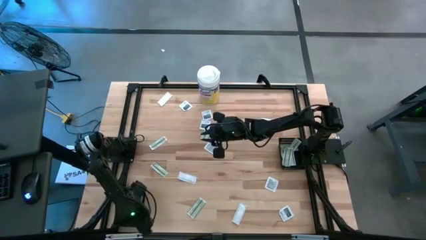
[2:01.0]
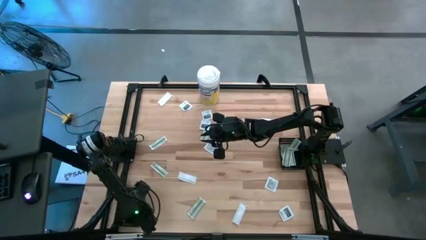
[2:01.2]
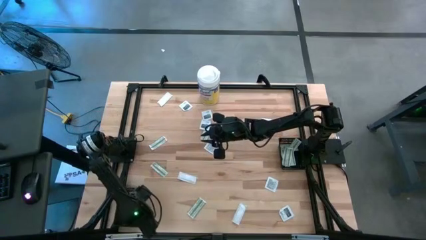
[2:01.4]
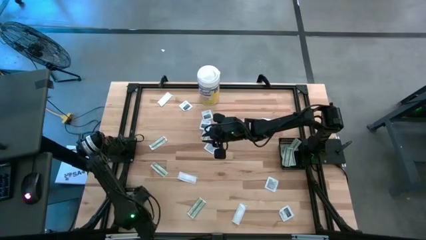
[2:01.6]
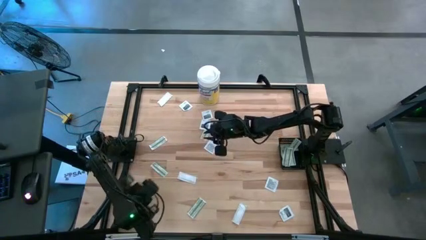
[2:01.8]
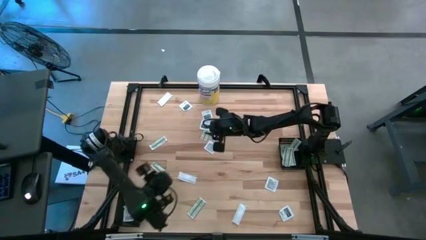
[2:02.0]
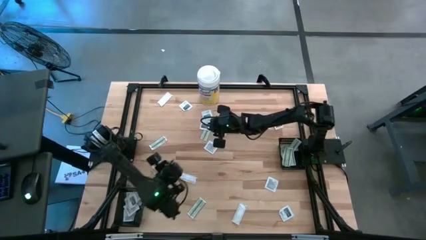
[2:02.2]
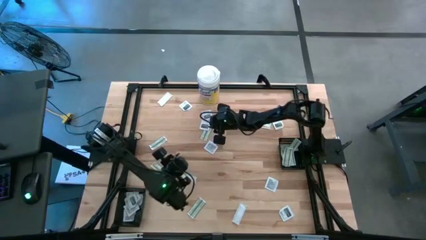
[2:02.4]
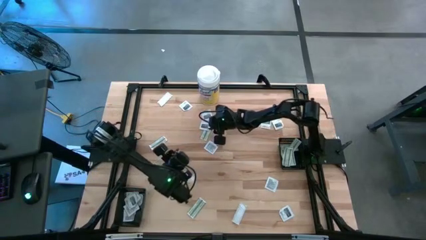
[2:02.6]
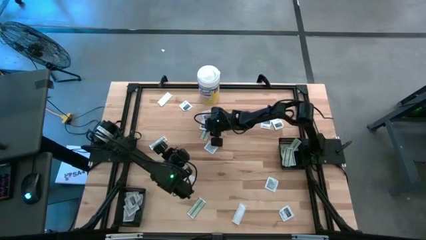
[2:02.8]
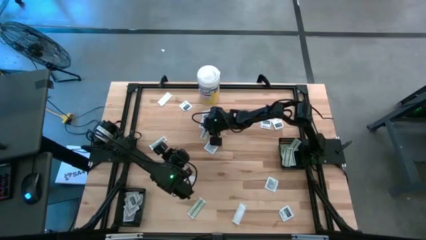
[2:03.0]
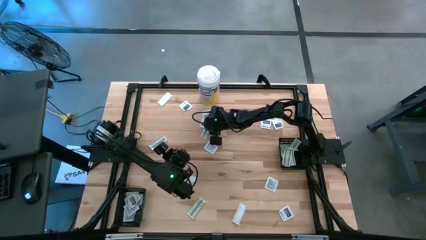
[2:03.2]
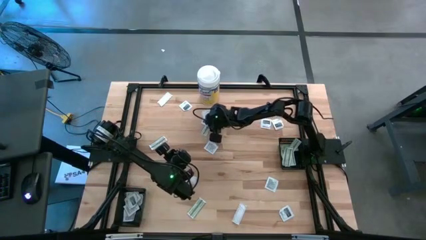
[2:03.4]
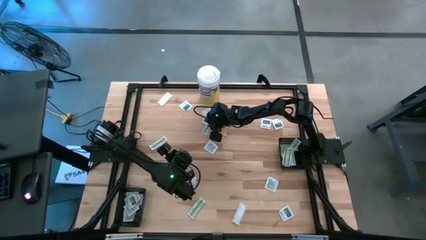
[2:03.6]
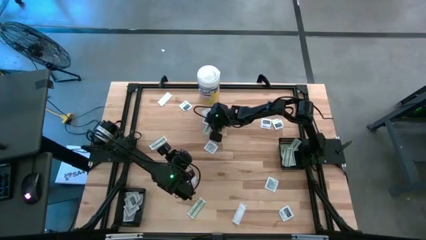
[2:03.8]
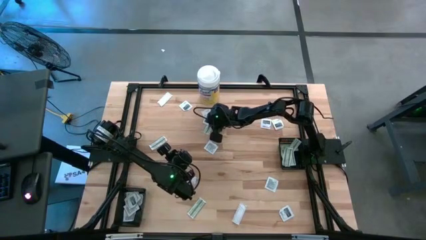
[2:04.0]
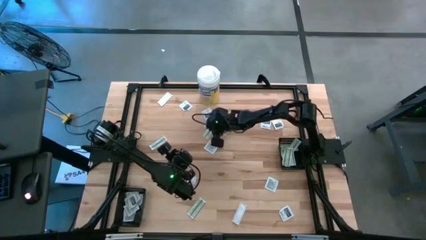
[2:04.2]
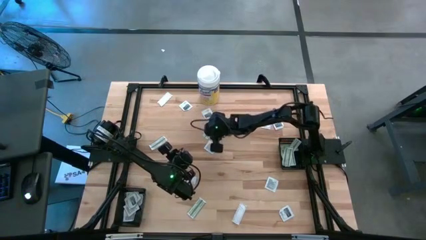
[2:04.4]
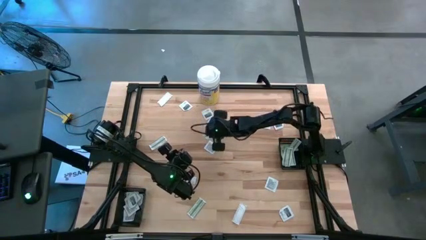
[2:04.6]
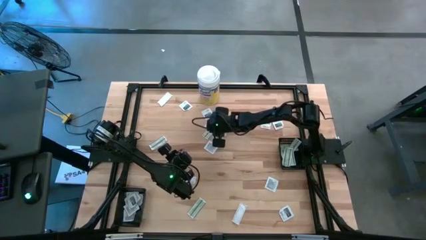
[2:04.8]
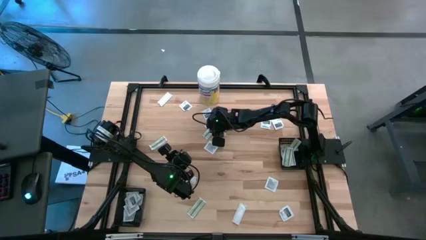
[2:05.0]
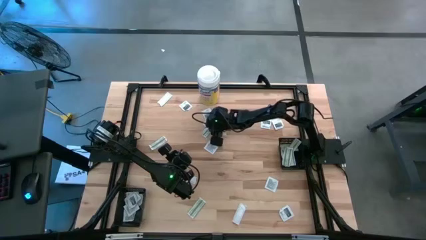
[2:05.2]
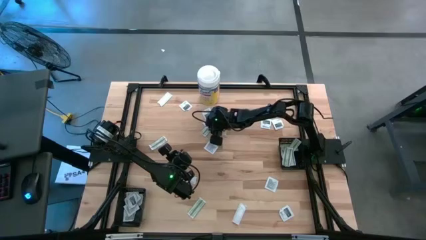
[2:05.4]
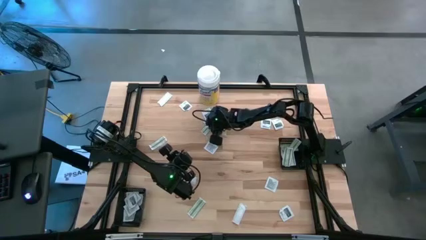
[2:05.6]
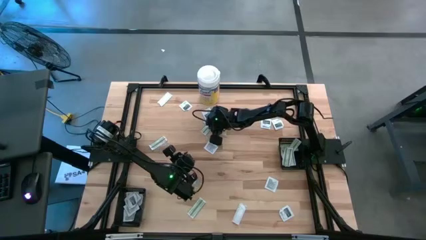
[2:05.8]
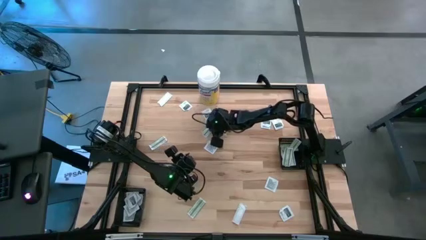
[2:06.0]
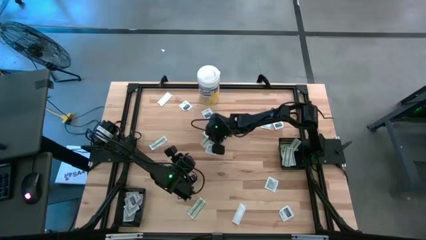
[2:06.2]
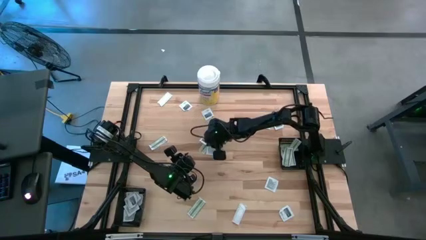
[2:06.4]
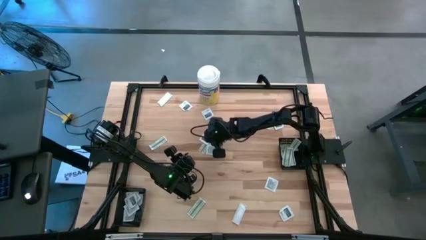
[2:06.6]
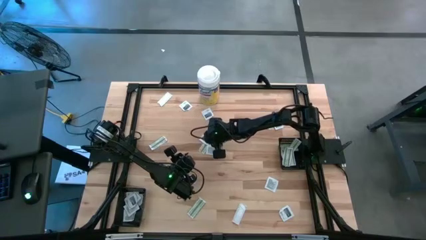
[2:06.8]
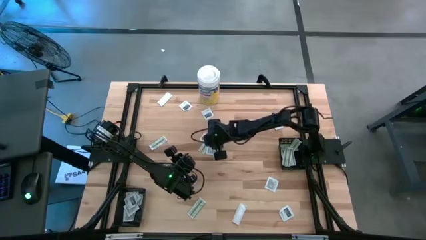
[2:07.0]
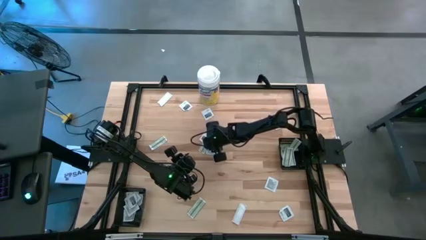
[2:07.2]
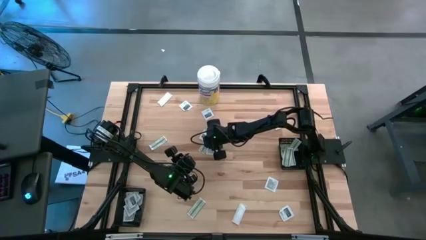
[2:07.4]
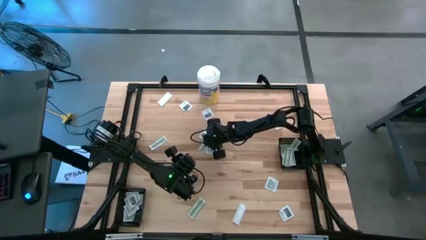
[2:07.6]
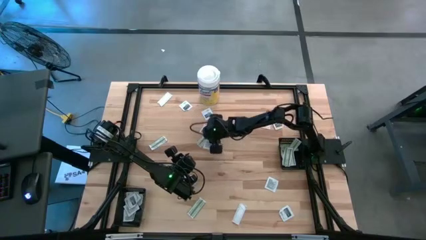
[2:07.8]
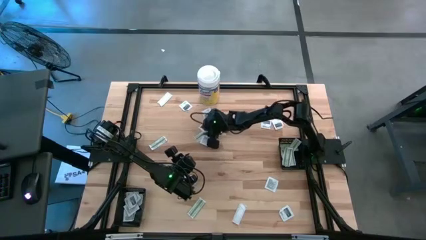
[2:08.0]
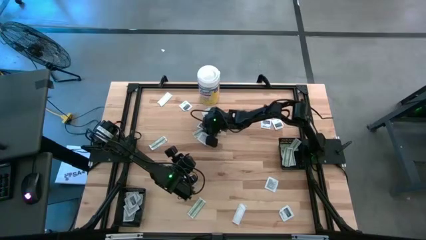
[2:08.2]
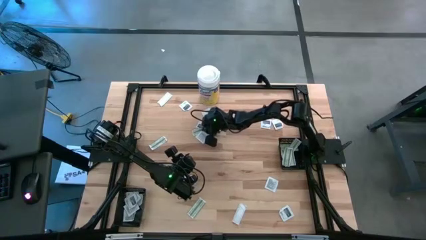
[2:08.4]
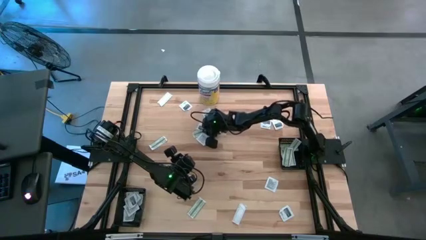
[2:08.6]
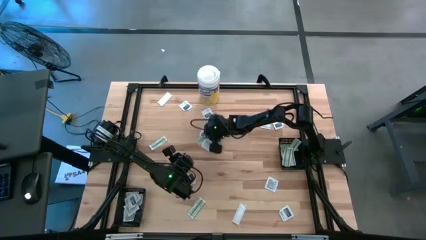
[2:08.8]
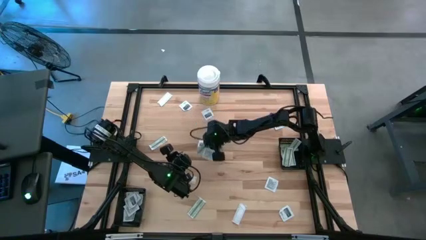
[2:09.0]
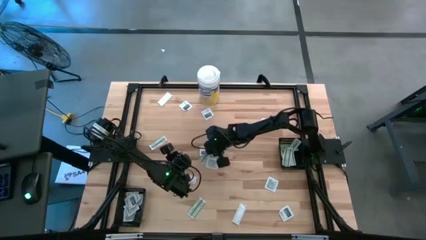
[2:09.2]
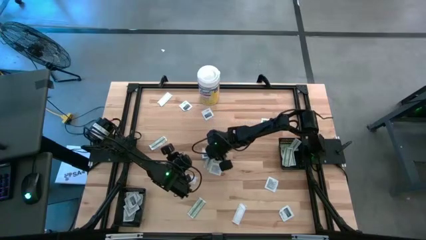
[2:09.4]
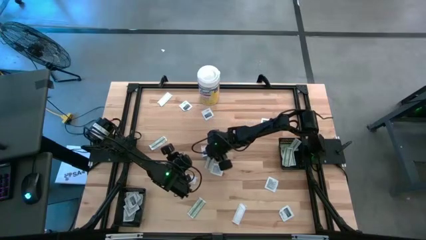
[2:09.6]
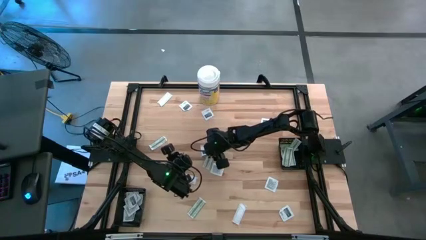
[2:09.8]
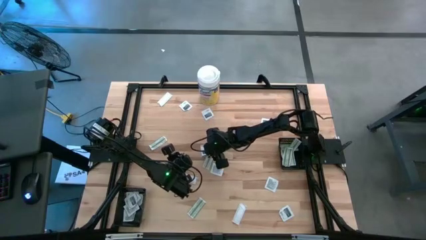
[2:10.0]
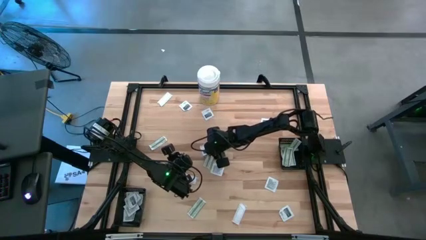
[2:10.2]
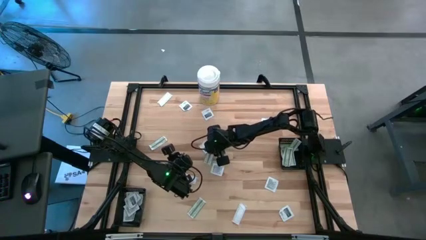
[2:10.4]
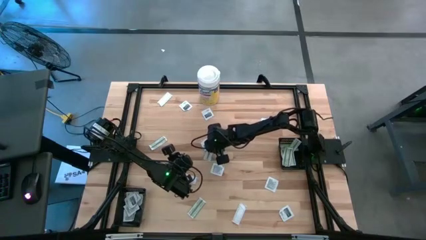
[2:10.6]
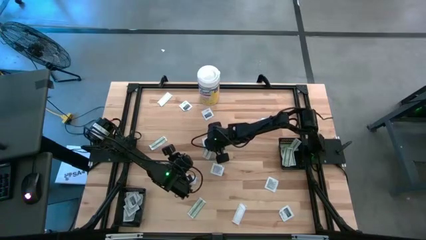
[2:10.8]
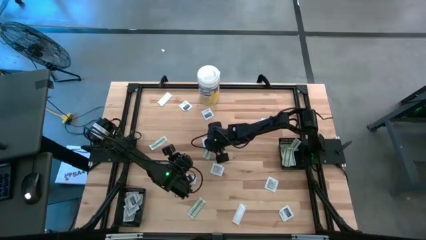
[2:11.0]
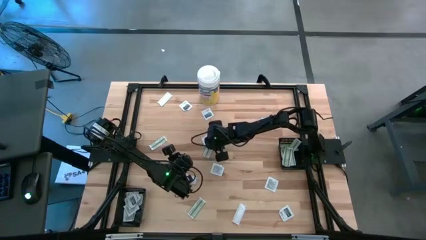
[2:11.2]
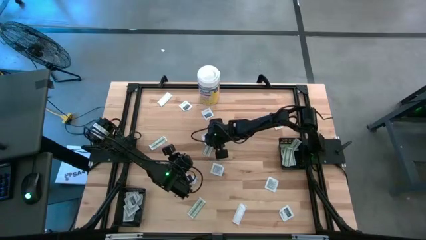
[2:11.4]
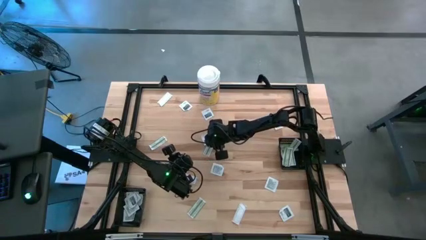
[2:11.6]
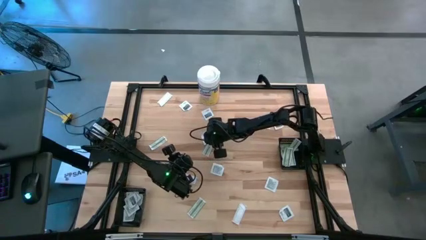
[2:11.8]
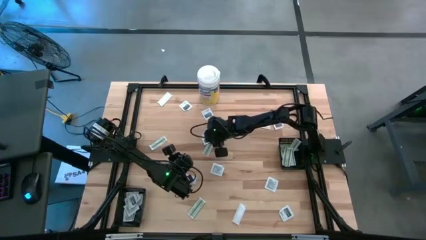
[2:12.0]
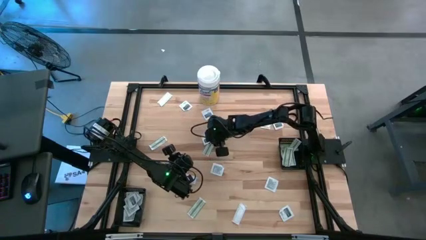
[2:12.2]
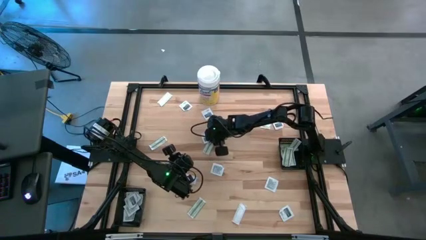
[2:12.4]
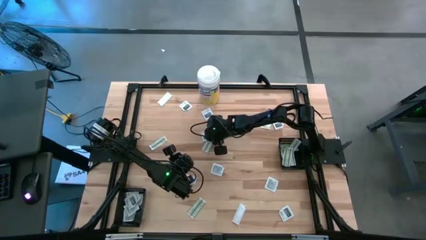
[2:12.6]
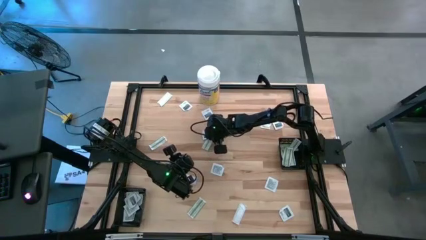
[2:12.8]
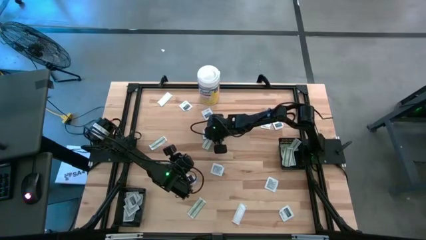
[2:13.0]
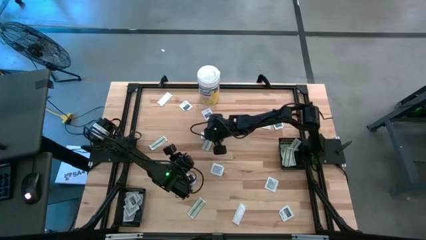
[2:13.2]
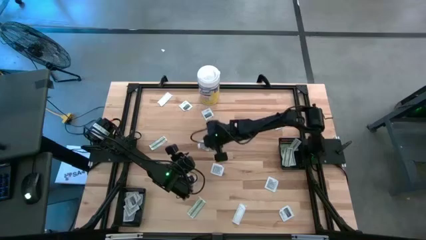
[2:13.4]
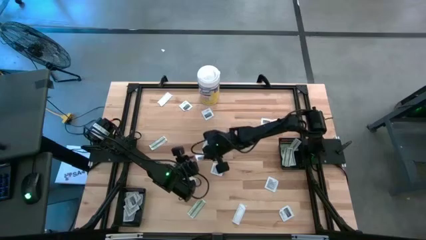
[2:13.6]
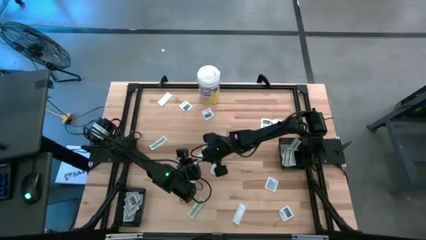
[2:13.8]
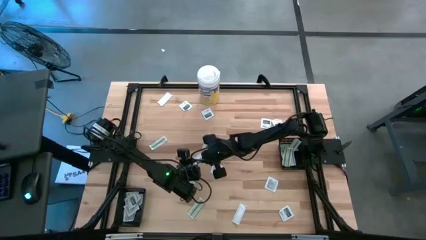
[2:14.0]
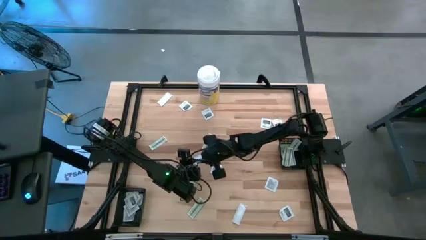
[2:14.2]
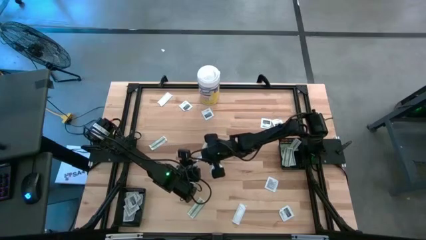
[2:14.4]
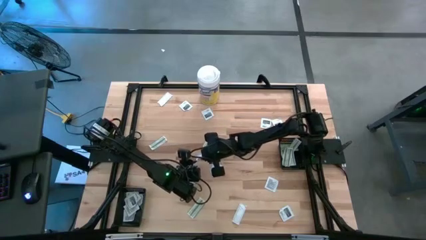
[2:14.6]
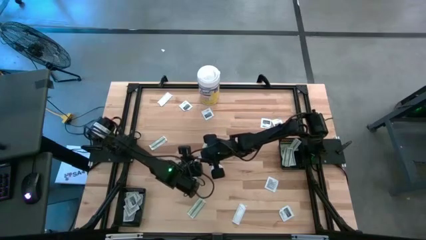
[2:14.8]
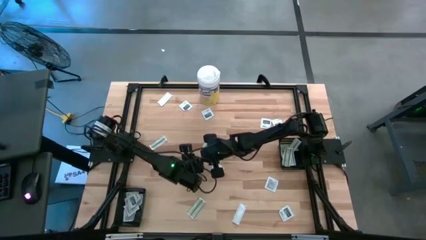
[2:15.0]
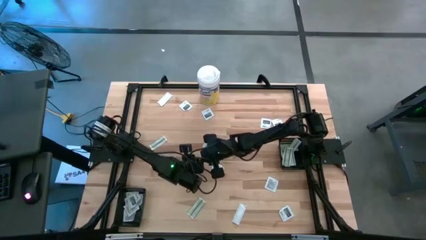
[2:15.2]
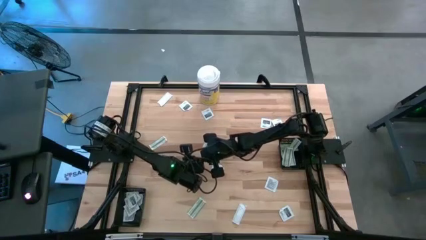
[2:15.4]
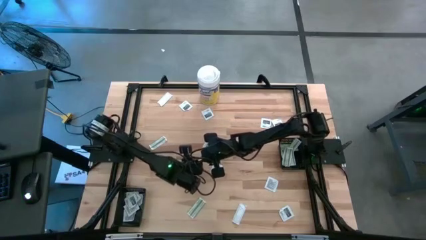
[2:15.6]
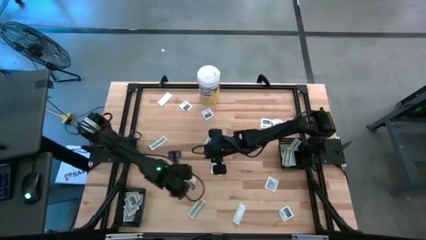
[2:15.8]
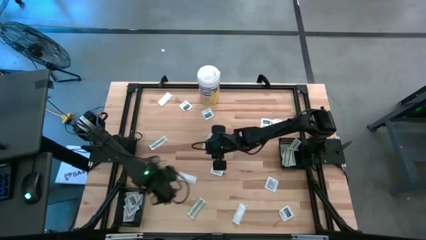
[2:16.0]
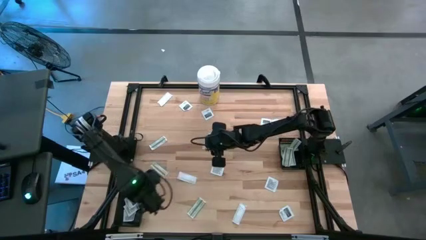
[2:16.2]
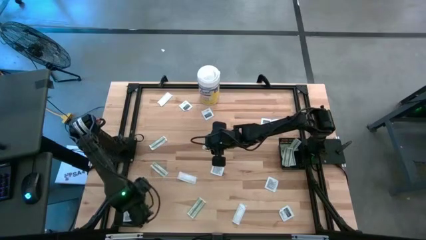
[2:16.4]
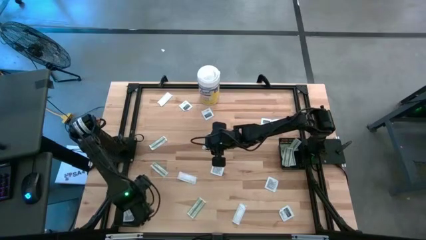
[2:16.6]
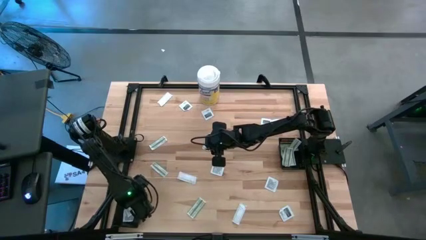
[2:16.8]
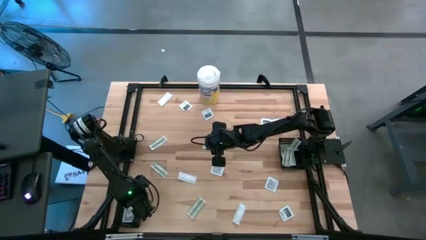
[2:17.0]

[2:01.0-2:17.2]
Task: Pick & Place First Aid Supplies
Put the white towelette sachet into the left black bin
